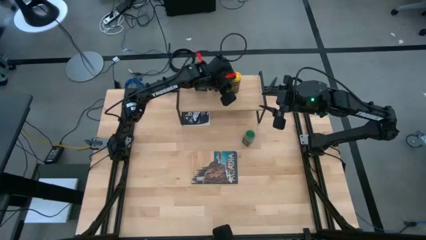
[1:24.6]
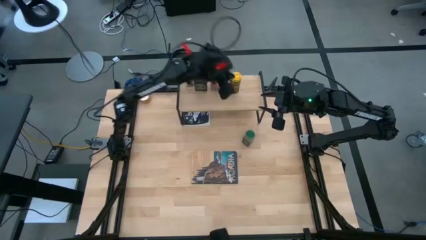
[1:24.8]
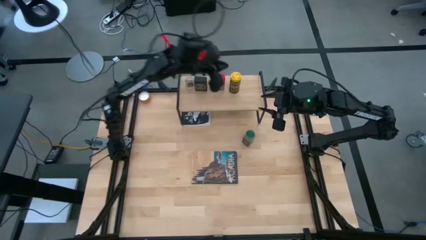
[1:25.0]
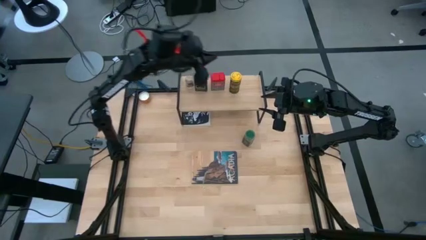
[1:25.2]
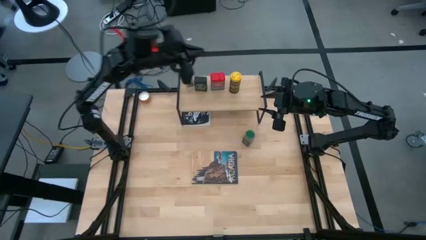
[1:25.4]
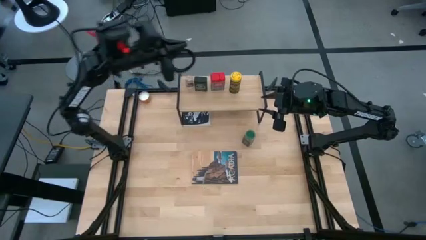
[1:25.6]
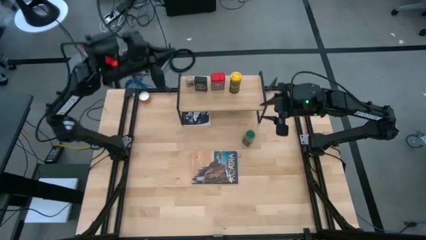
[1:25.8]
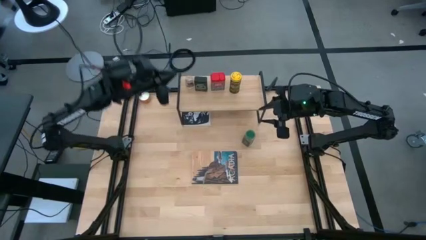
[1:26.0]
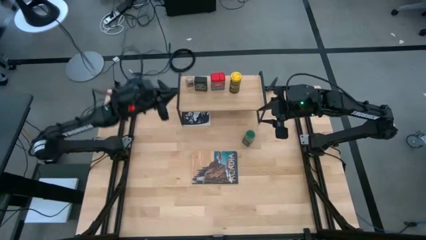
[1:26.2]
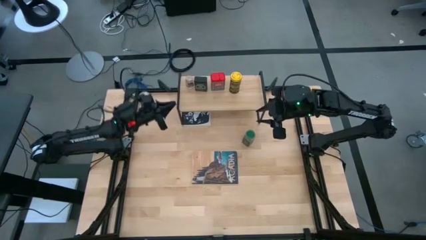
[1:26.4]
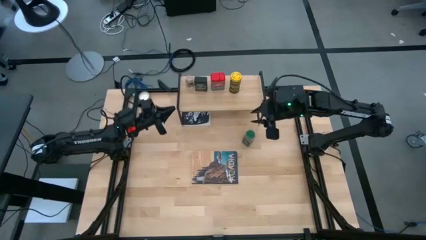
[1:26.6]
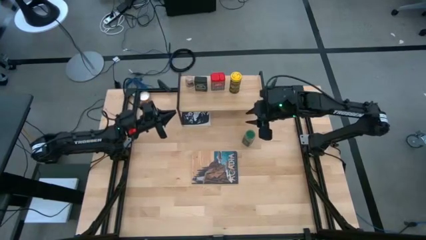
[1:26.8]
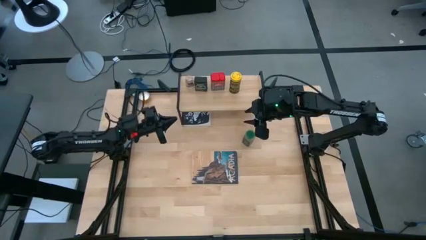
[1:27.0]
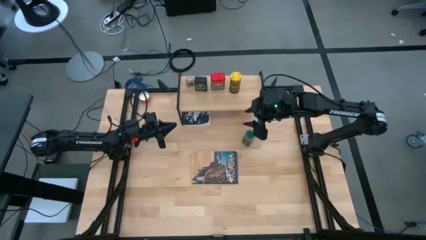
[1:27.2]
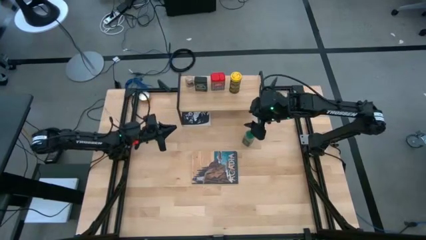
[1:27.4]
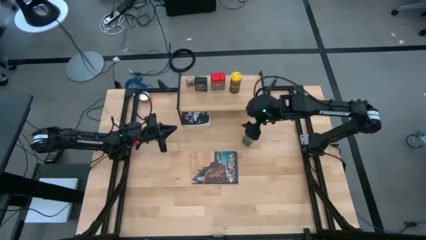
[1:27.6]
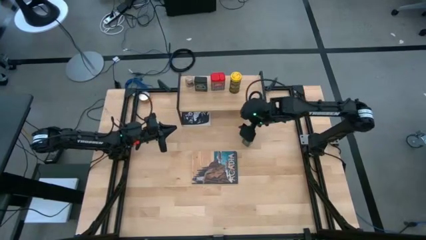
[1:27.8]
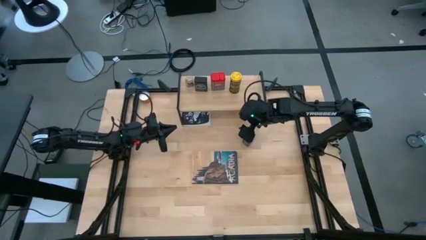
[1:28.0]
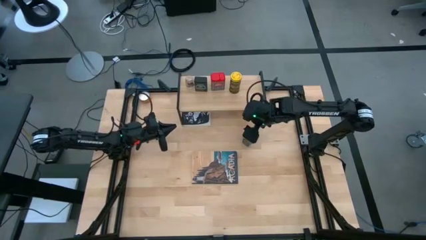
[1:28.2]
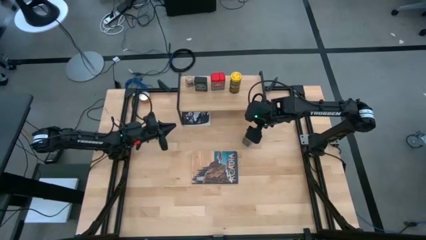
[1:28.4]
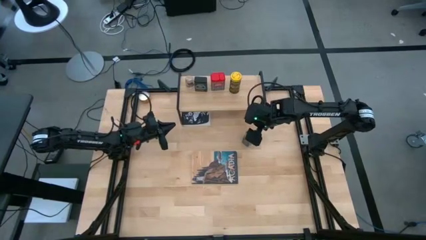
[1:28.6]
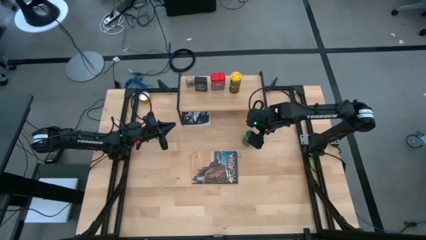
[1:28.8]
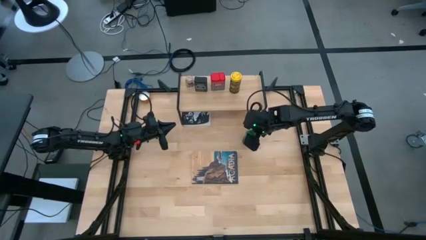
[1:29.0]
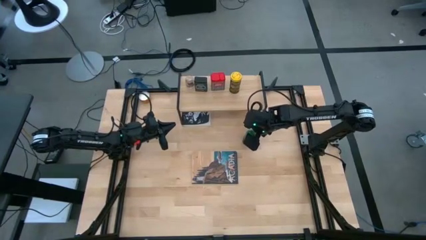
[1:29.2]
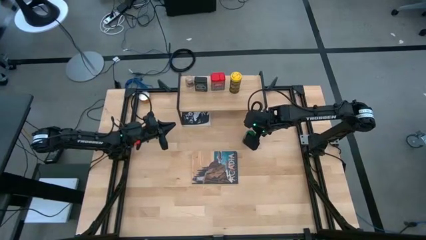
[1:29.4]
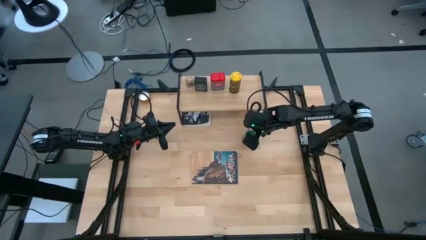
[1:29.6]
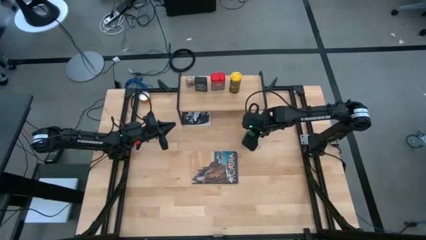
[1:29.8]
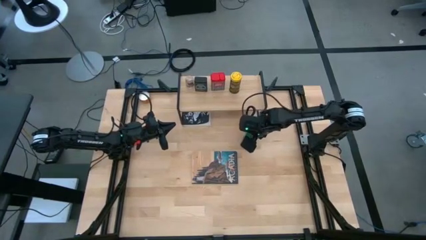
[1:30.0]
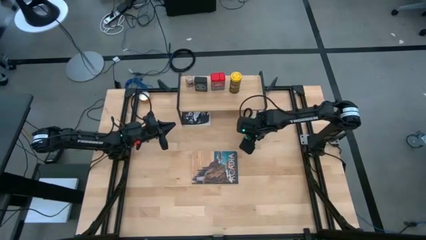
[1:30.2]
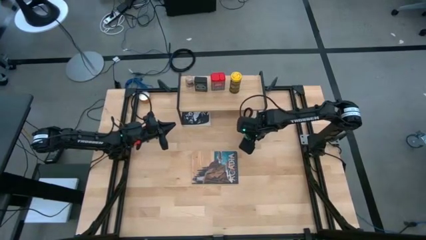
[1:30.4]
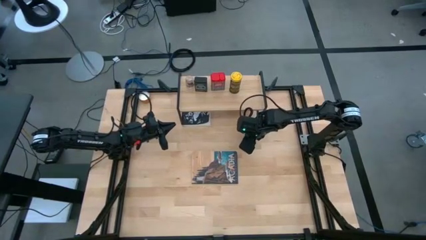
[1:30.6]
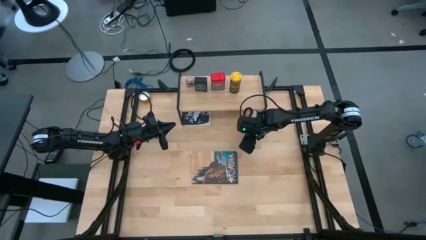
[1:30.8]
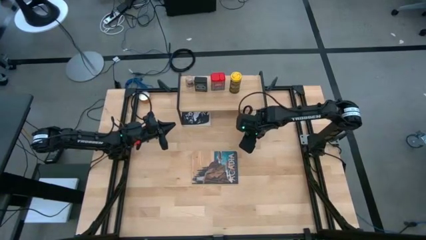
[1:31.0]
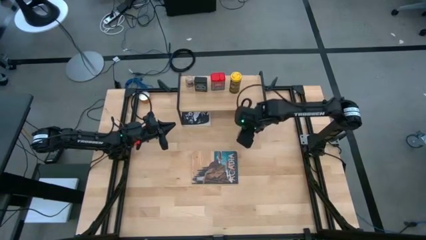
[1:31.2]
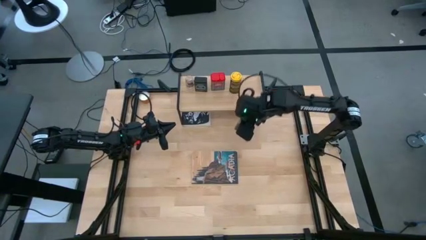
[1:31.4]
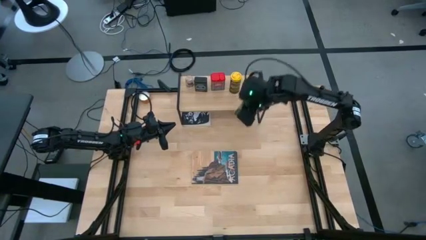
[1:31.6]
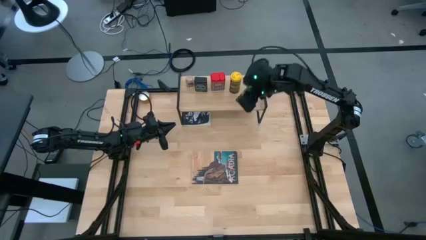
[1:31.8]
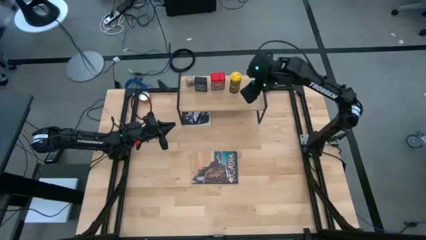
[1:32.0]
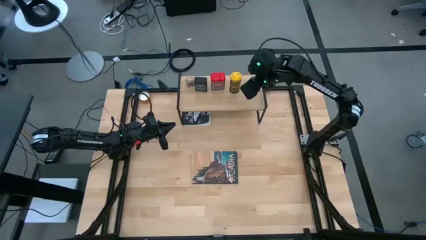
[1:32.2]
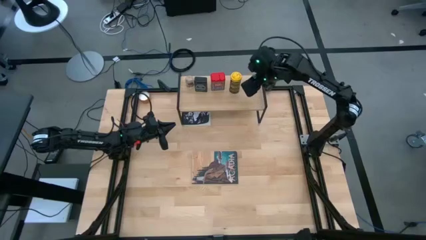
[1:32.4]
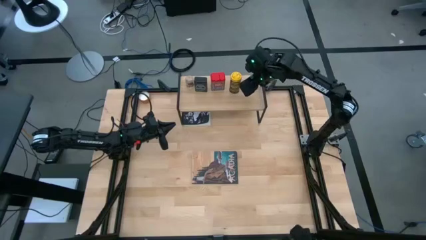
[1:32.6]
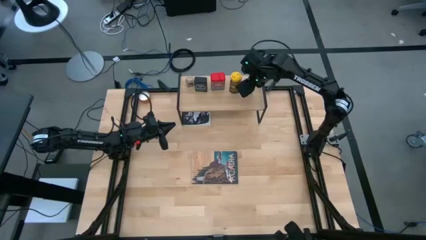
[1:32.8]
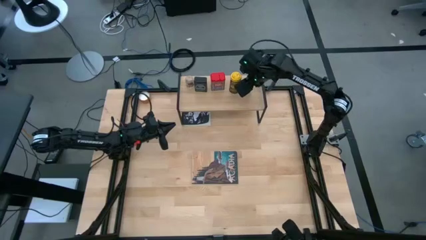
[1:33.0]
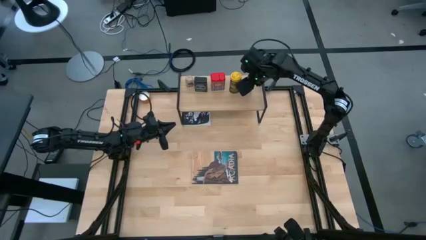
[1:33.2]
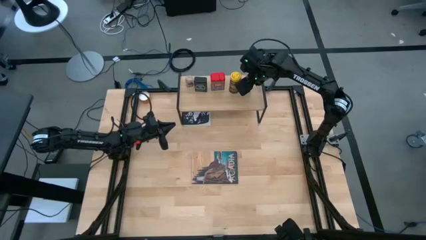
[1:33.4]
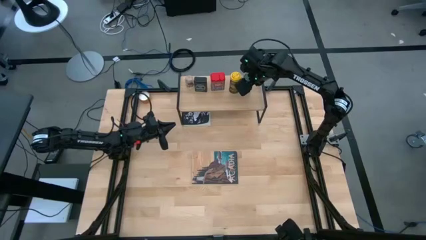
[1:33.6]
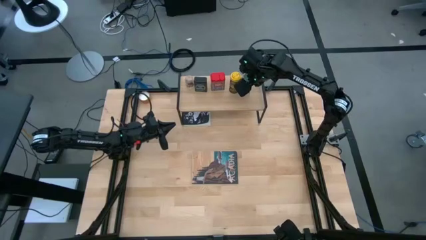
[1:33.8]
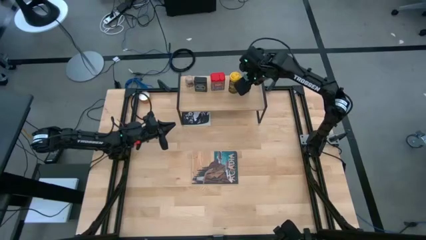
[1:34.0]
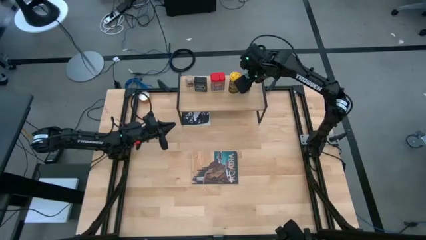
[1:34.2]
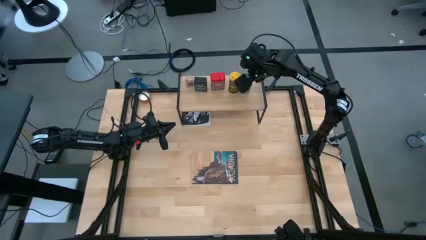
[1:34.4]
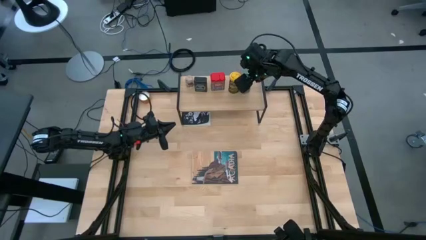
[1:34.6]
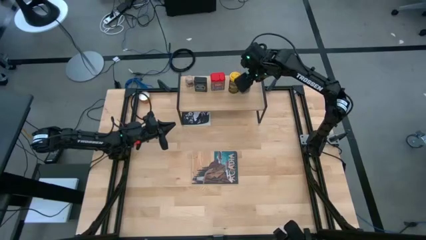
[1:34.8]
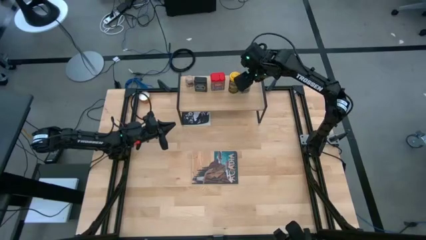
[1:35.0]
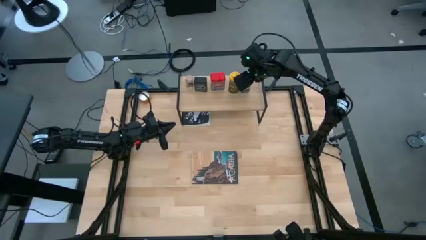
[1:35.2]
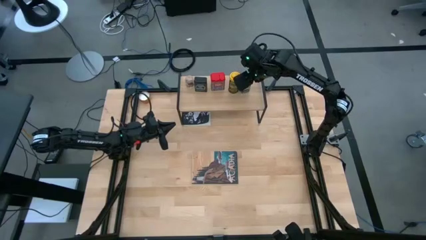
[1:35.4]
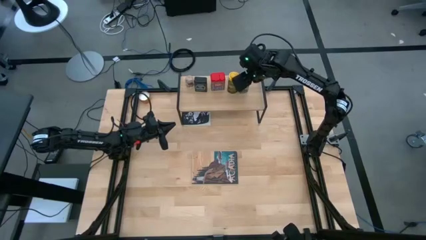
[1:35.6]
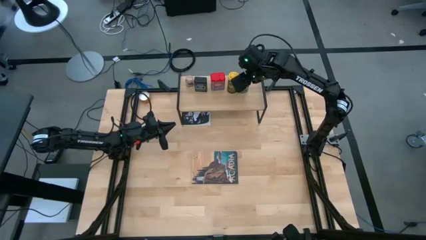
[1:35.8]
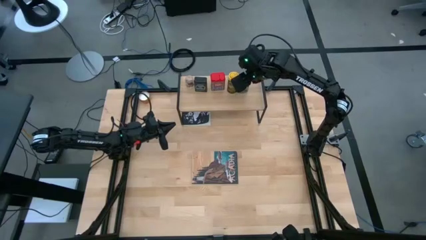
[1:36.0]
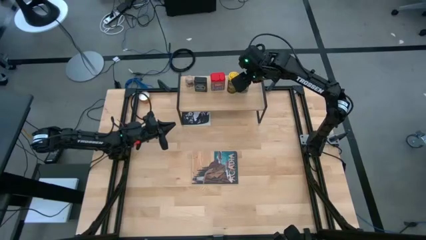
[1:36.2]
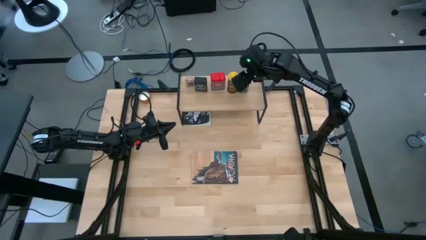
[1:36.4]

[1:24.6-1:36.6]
Task: Shelf spices
Put the green seasoning bottle on the shelf

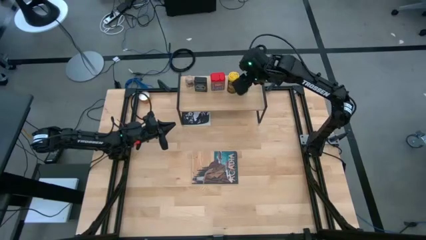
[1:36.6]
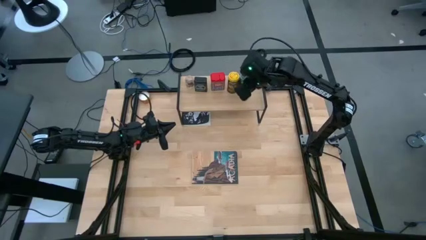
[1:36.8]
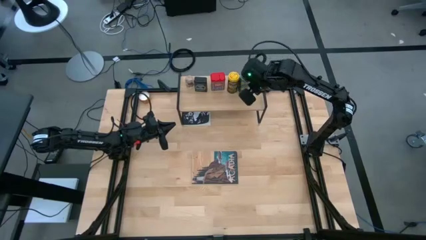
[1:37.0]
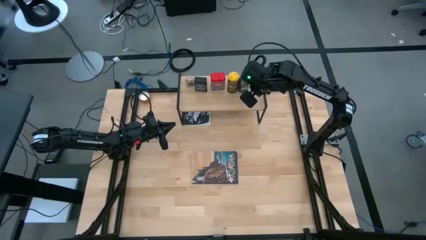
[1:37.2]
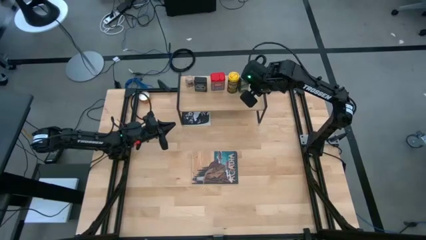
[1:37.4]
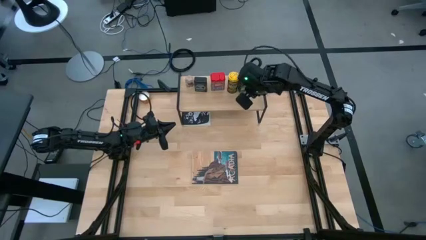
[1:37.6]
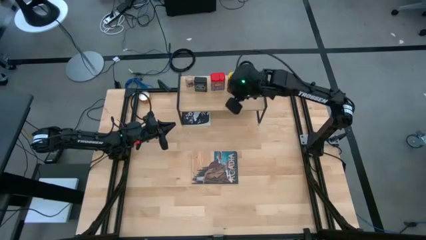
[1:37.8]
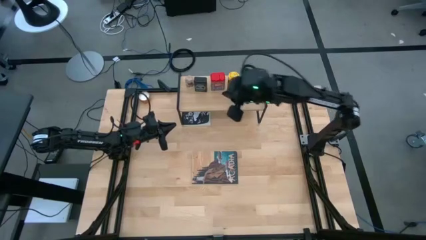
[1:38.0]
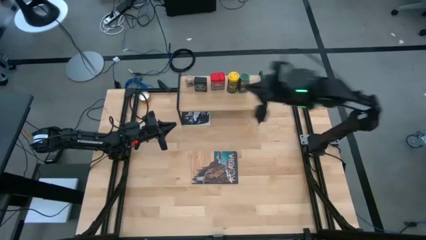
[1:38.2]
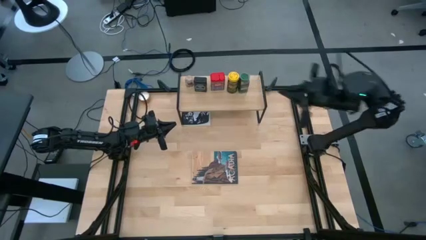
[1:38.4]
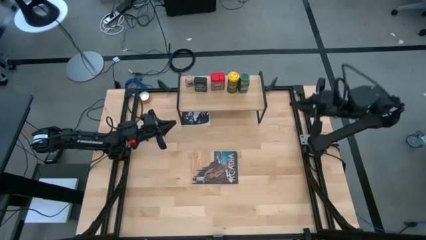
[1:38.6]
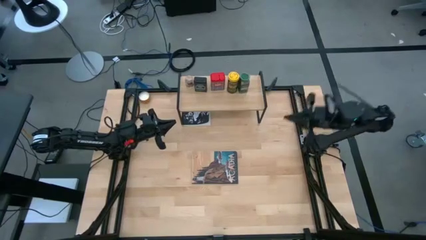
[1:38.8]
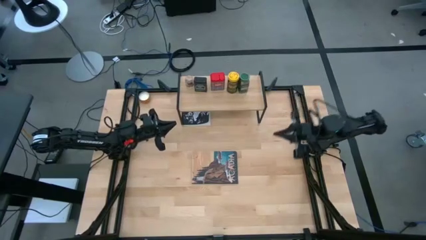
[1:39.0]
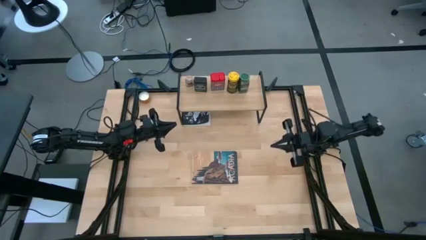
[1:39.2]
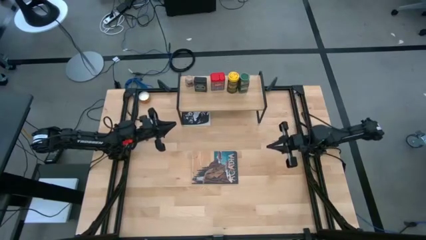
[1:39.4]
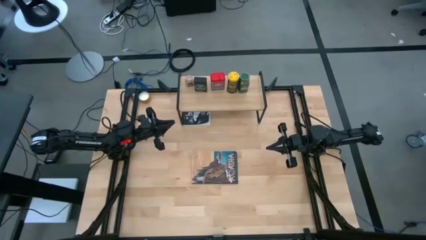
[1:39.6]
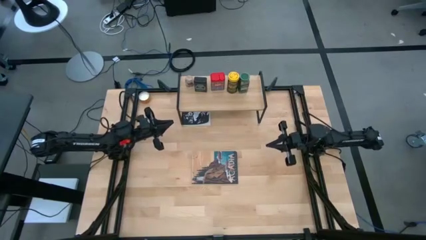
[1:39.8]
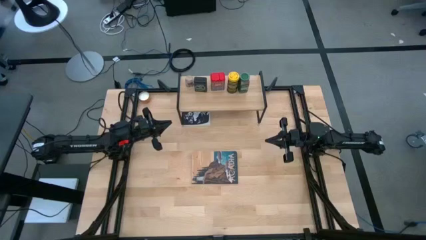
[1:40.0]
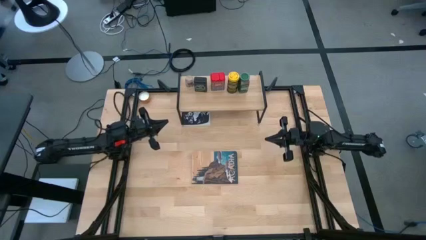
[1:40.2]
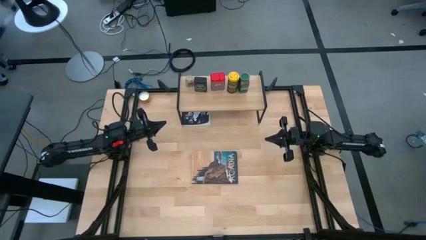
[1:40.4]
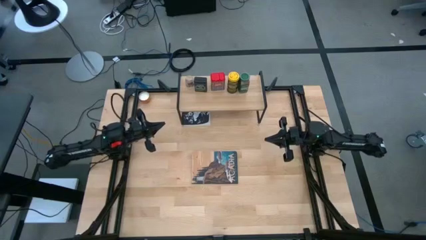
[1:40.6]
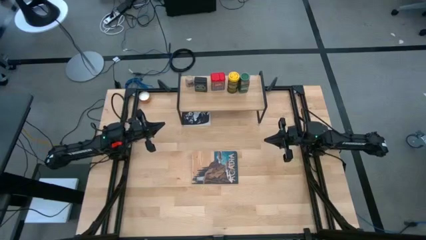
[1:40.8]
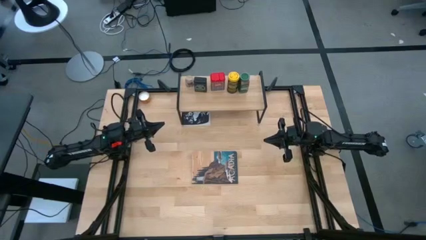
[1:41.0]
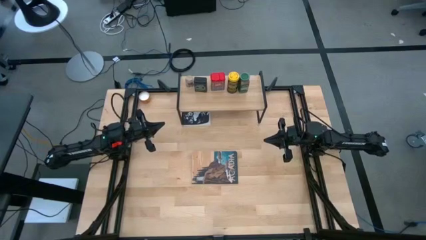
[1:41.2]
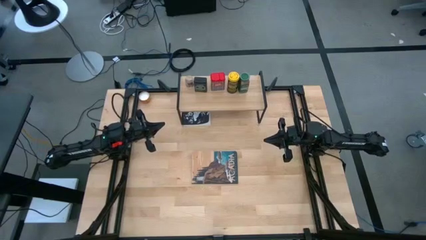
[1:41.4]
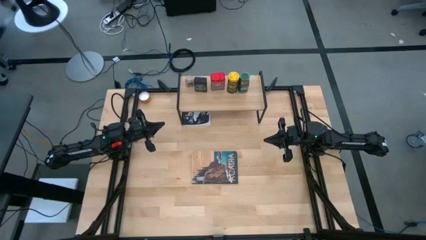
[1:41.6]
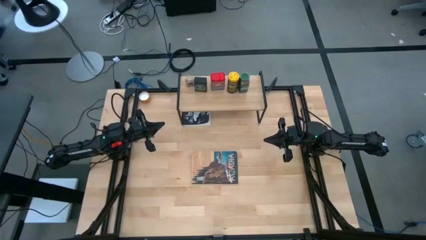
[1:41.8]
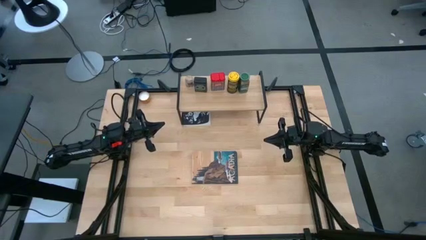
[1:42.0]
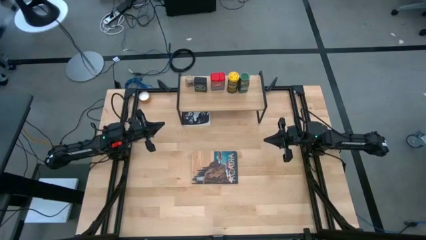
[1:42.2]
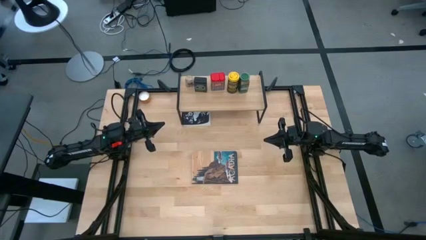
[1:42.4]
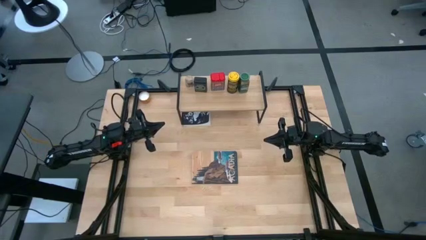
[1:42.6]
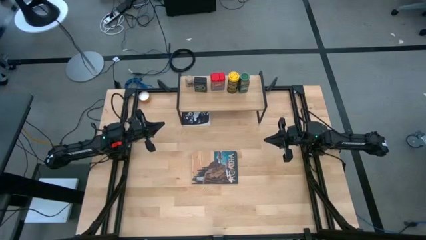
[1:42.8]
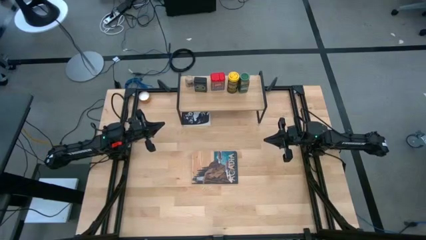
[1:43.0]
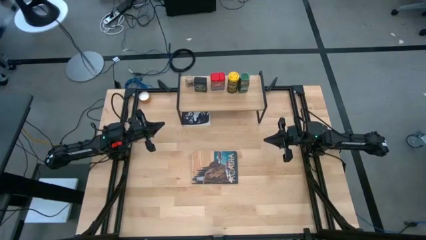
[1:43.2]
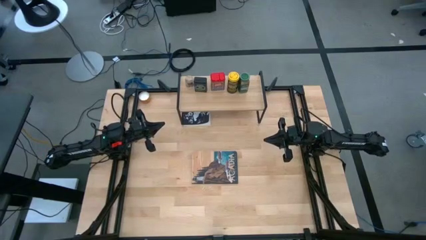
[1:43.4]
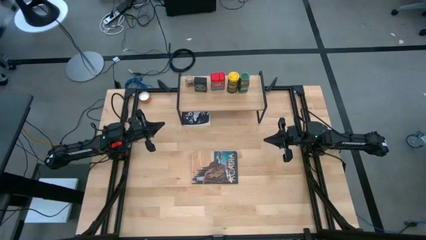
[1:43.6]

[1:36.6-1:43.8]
Return to Home Position
